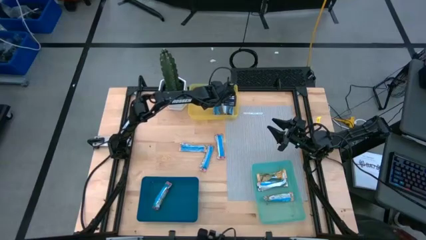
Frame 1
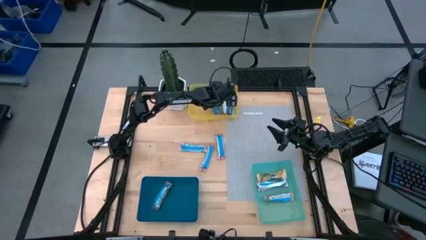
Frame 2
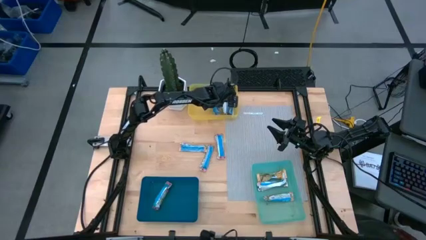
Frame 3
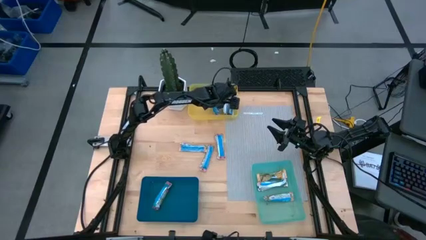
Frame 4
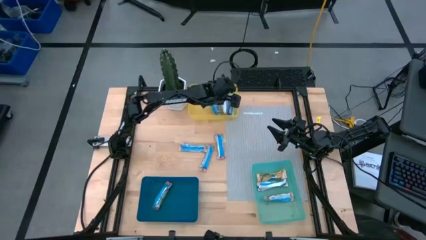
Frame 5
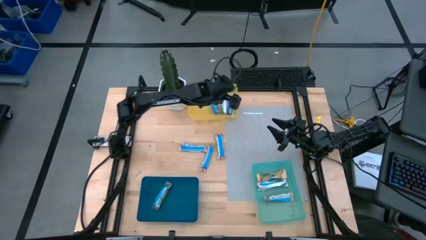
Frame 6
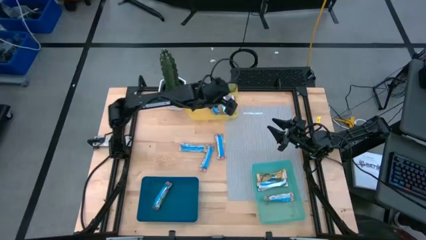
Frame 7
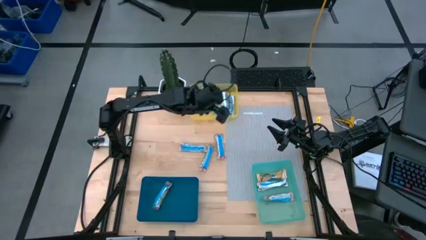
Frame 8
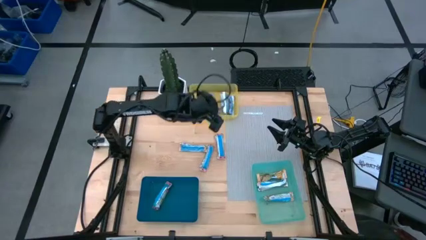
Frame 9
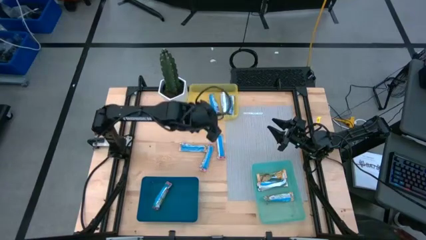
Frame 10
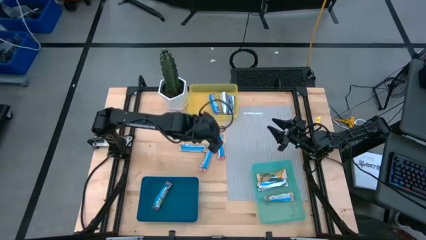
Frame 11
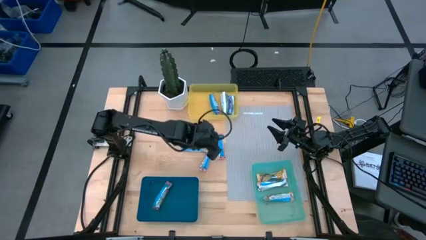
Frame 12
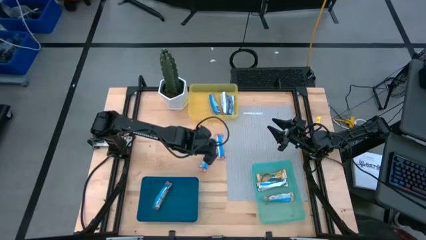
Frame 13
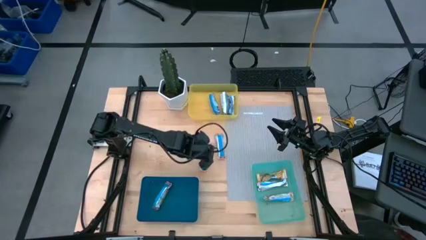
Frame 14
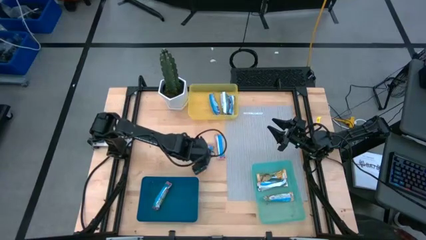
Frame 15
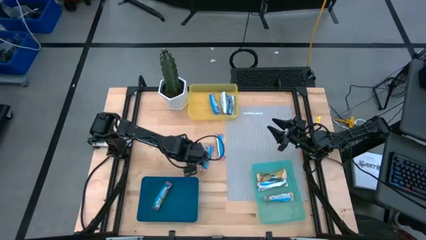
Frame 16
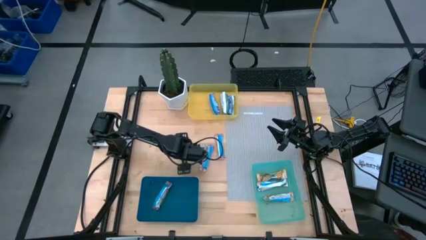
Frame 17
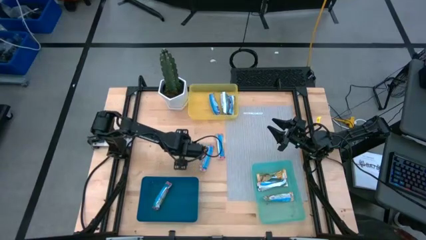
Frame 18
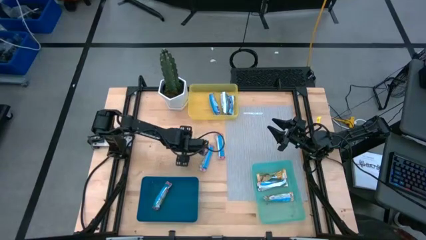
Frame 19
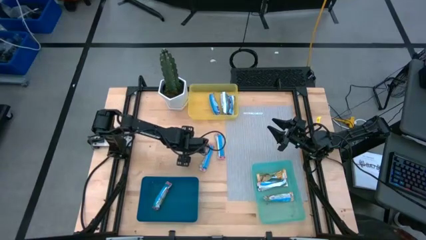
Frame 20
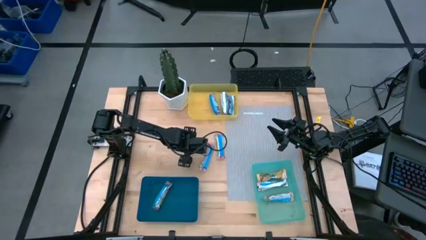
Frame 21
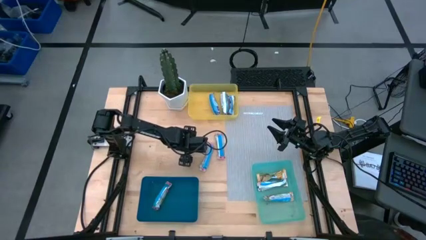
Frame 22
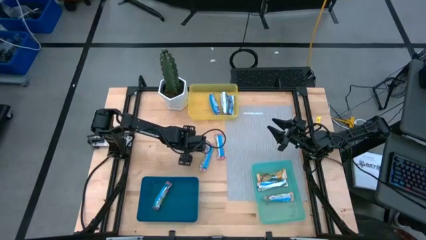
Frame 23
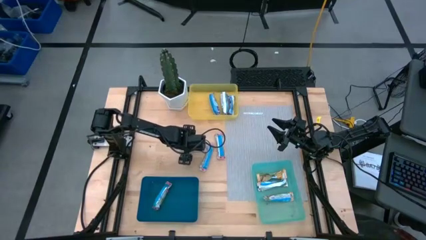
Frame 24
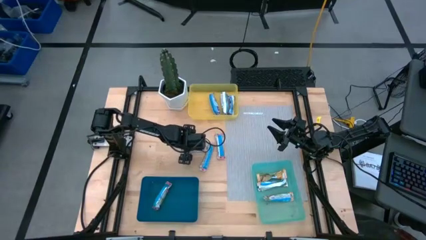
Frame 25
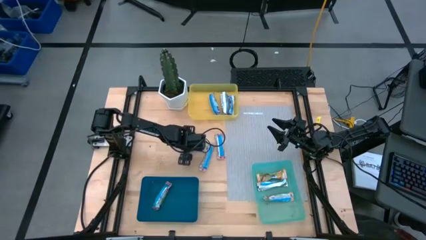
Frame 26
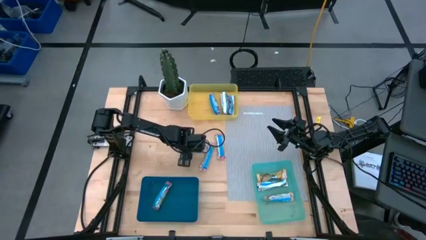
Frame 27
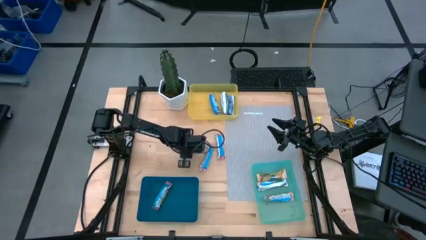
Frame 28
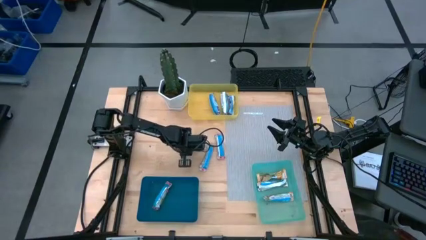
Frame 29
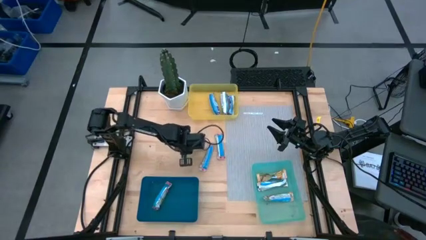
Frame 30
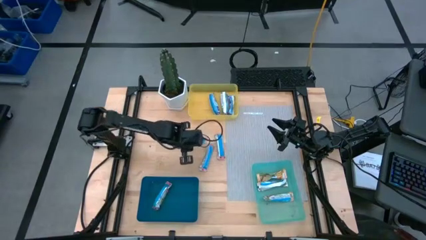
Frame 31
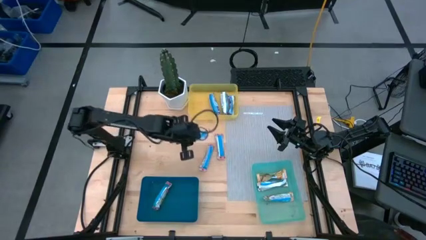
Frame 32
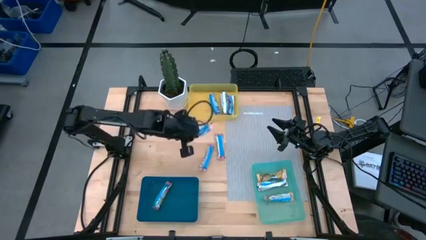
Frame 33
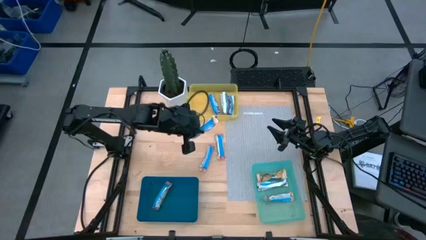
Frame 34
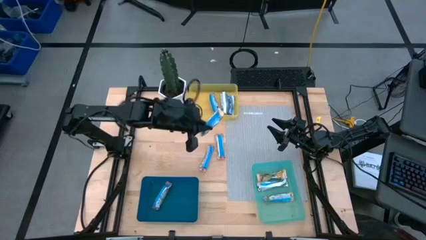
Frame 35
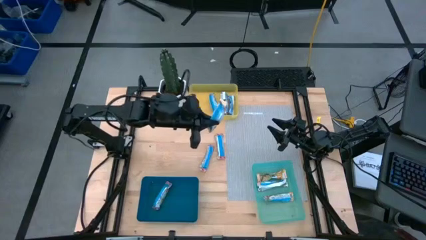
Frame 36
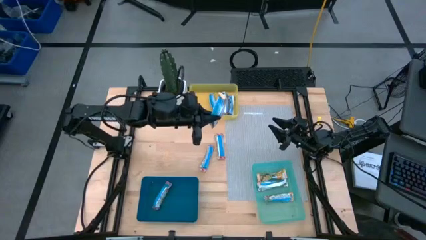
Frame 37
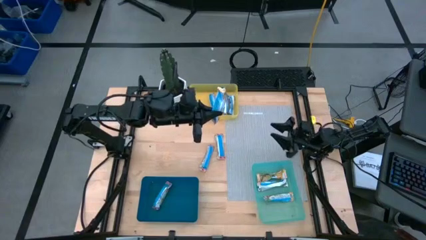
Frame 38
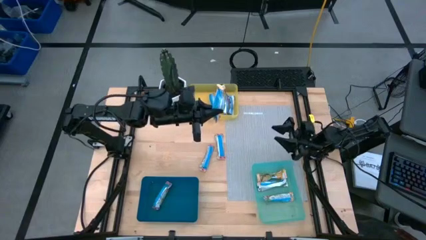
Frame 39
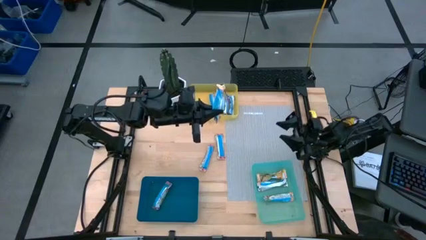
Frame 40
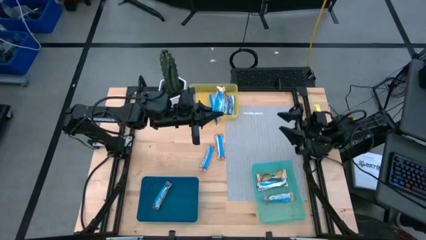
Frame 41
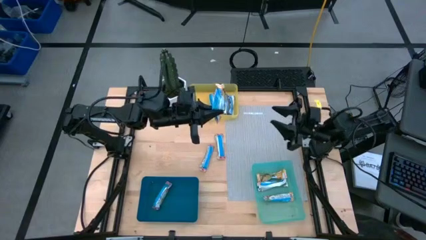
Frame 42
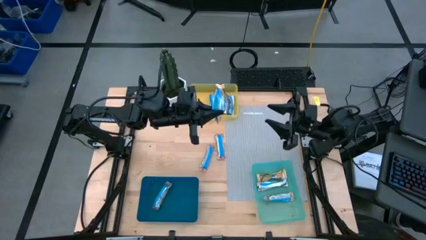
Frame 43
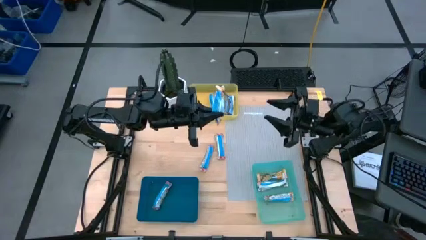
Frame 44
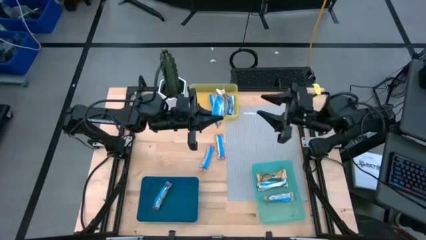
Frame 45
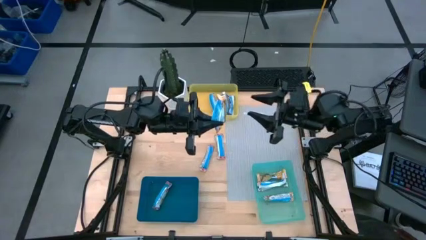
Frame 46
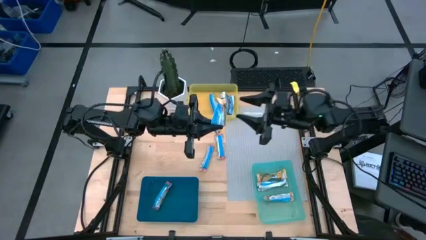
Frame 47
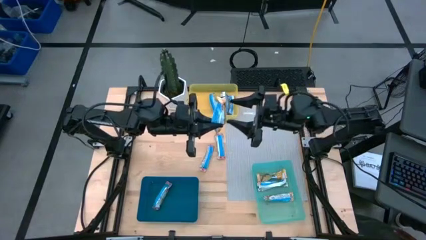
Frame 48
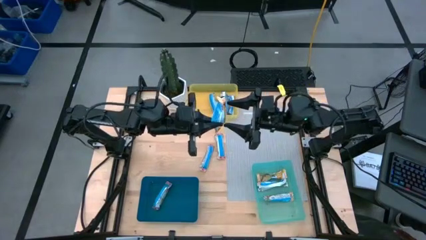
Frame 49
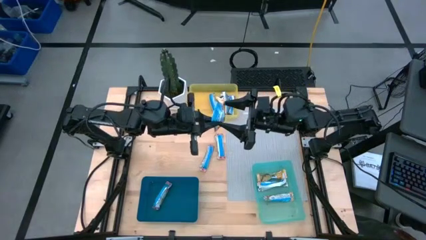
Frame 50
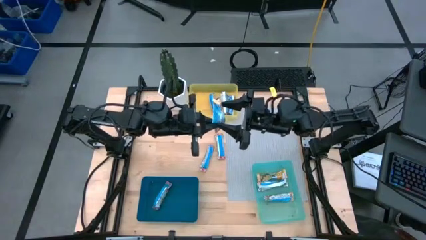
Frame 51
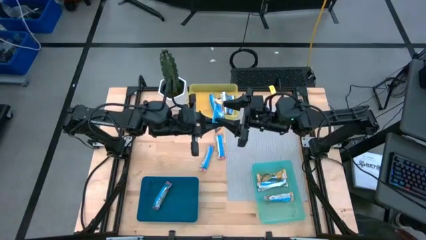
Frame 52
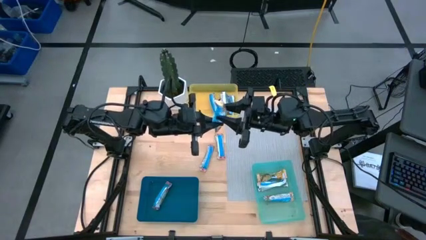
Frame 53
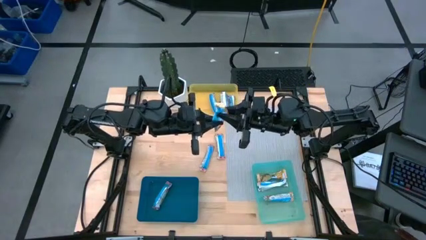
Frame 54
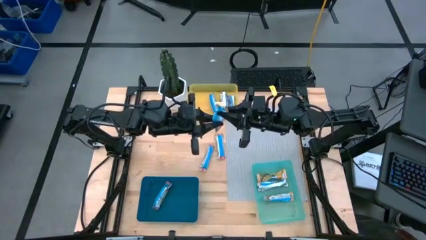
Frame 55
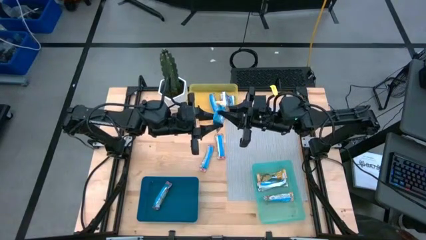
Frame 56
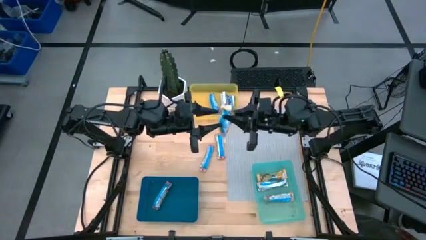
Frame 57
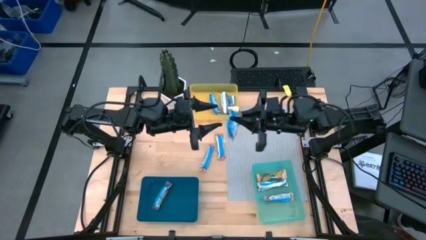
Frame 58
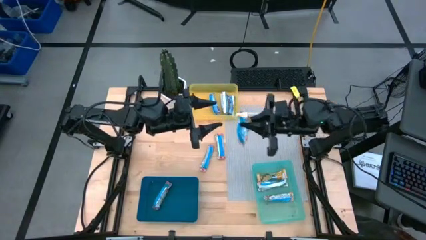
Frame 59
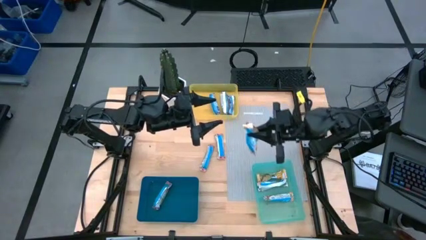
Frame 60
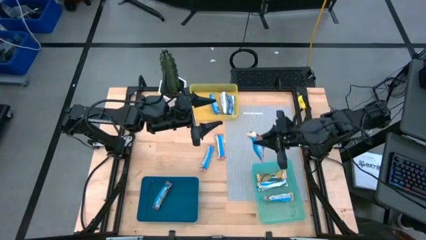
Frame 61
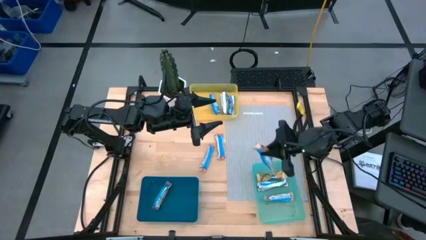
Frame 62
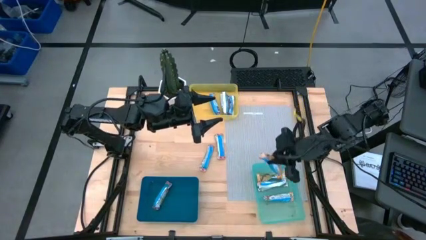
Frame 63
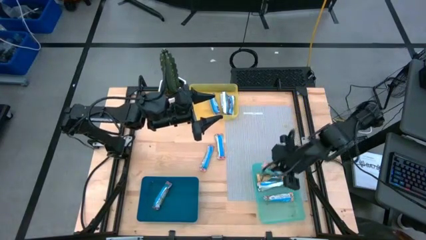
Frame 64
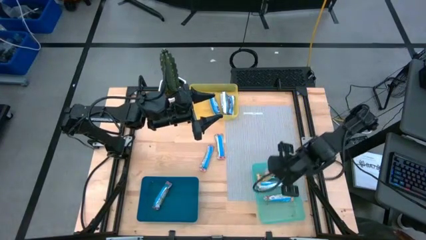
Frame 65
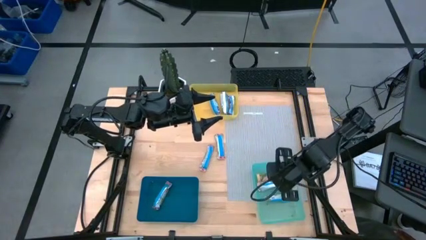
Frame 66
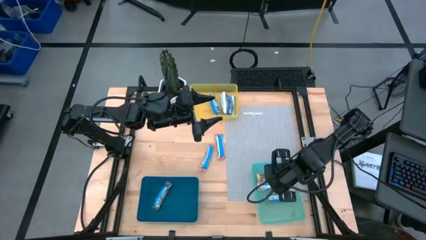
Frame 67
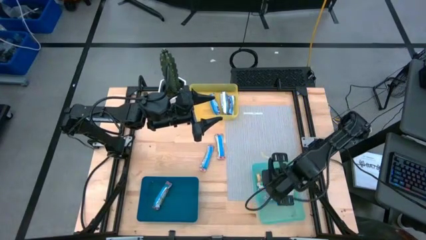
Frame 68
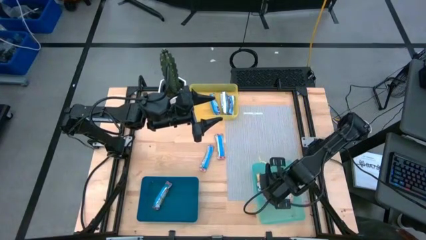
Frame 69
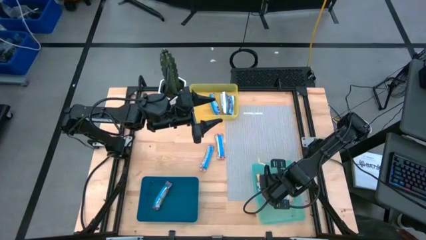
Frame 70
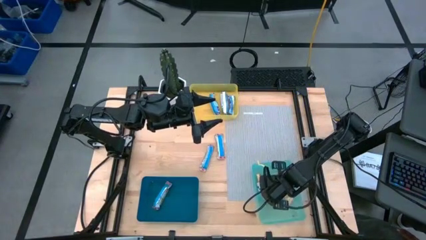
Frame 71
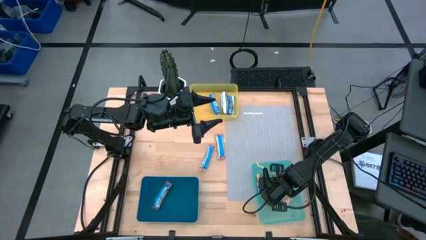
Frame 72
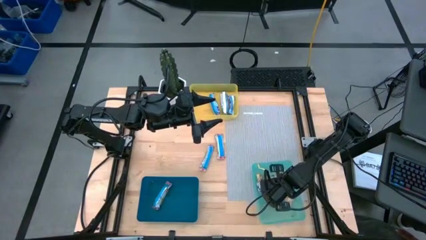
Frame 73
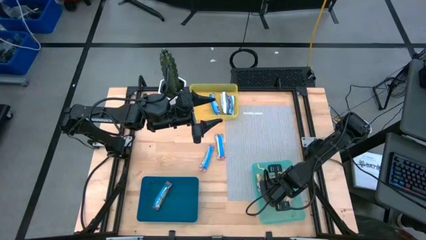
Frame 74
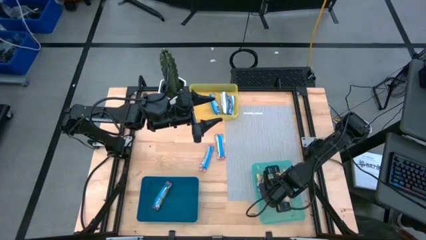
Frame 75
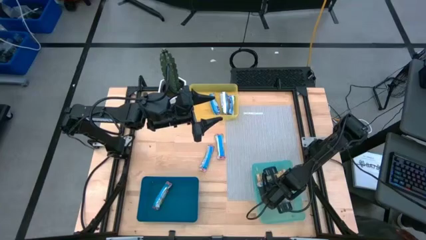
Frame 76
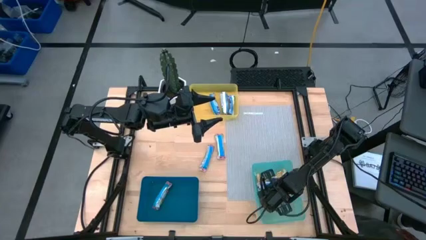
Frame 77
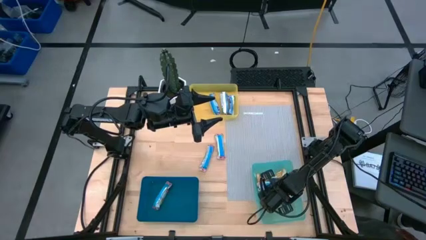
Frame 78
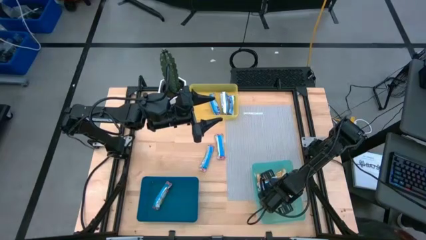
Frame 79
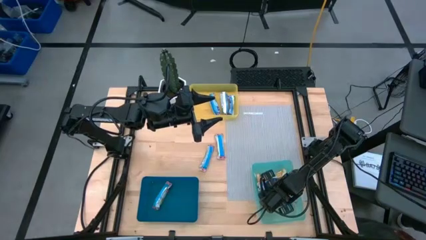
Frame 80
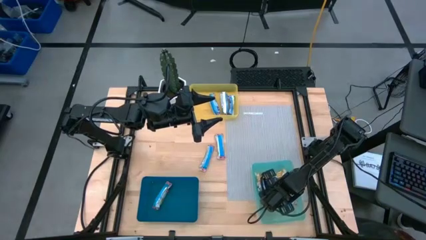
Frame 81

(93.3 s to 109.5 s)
Task: Pick and place Granola Bars by type
Put the yellow granola bar into the green bin
